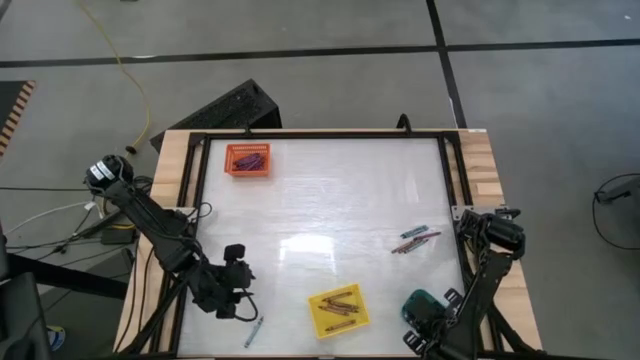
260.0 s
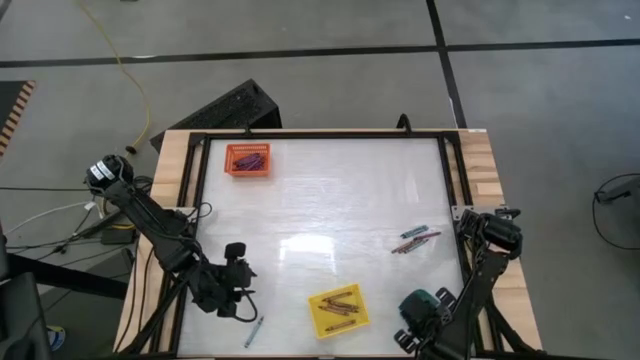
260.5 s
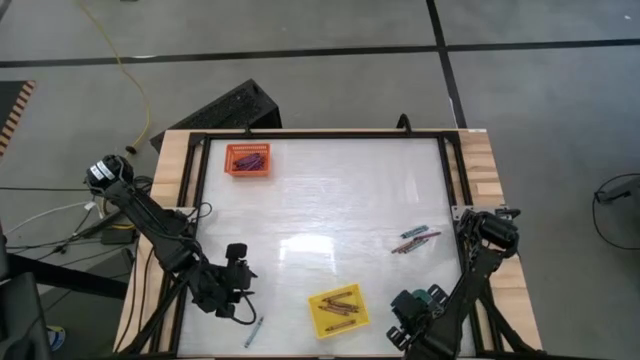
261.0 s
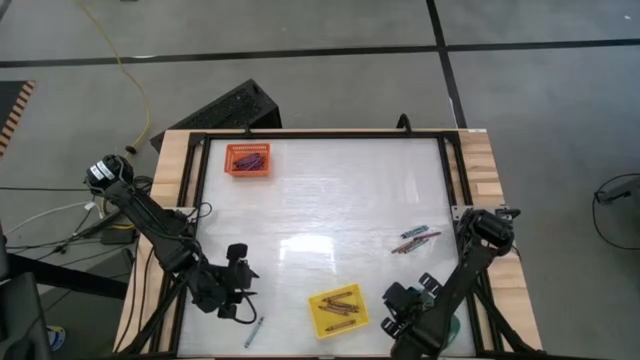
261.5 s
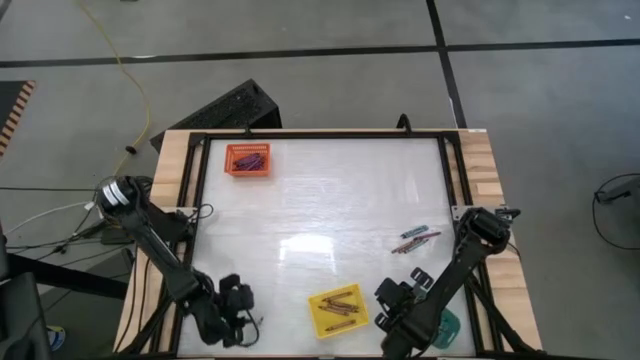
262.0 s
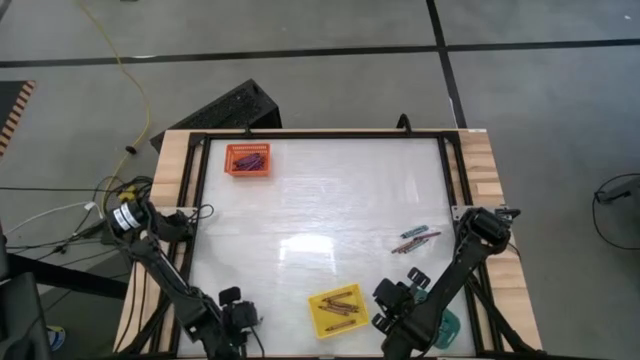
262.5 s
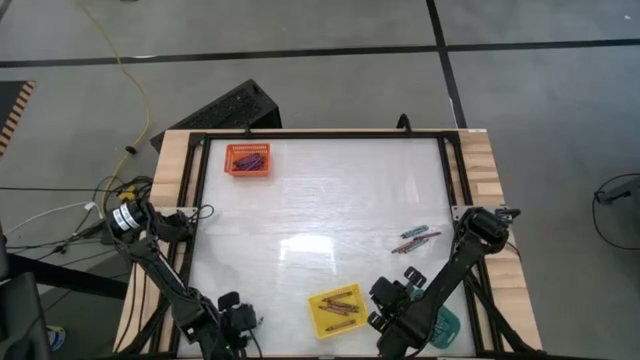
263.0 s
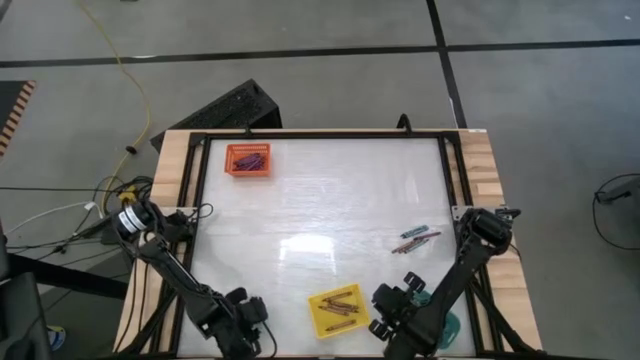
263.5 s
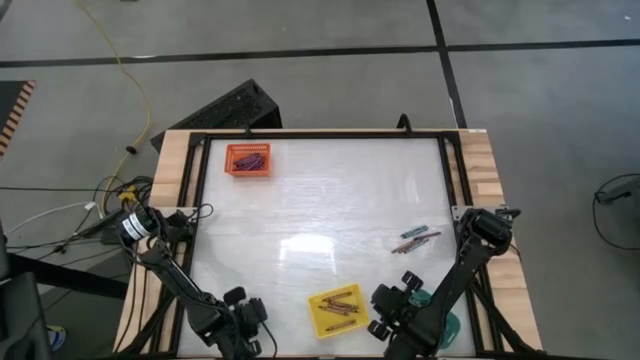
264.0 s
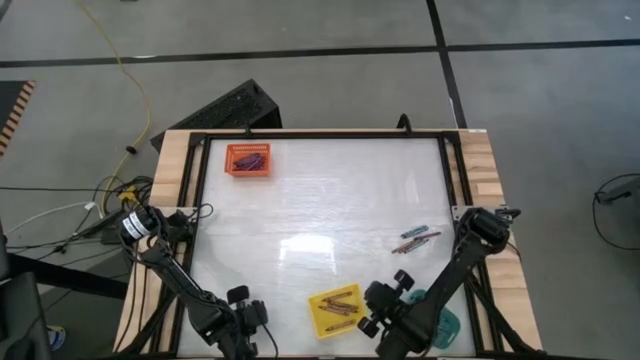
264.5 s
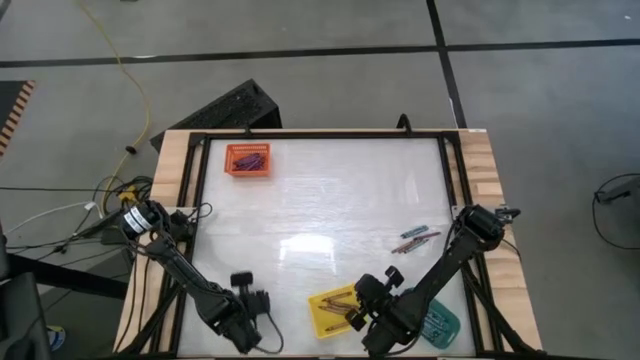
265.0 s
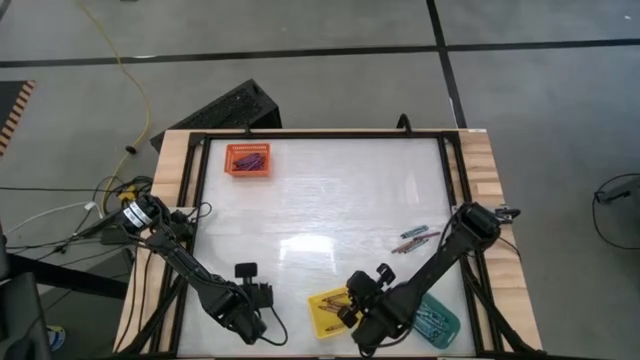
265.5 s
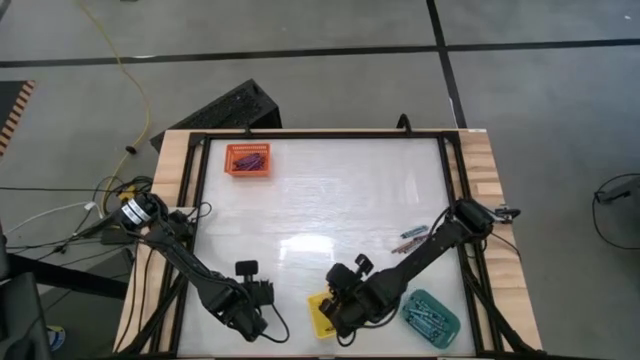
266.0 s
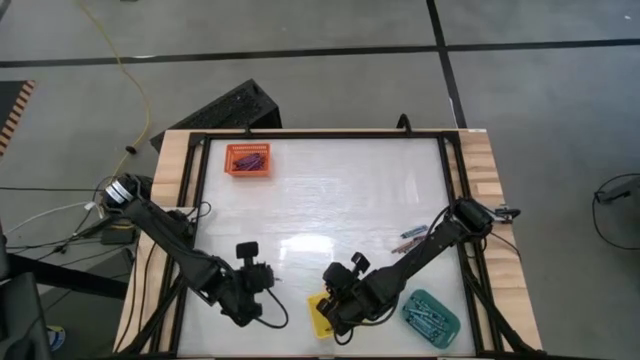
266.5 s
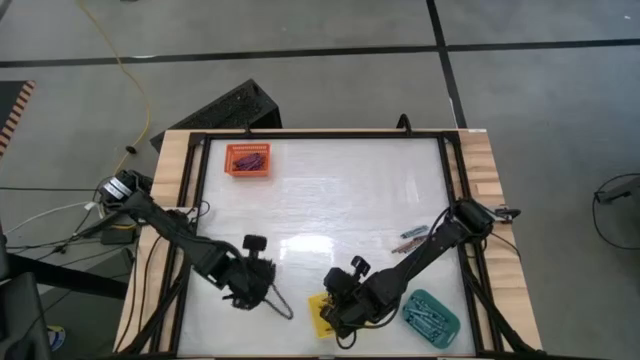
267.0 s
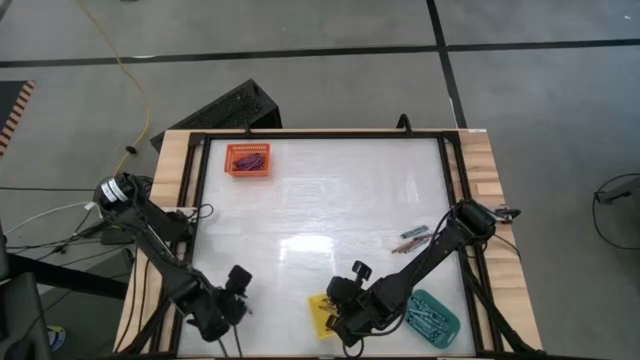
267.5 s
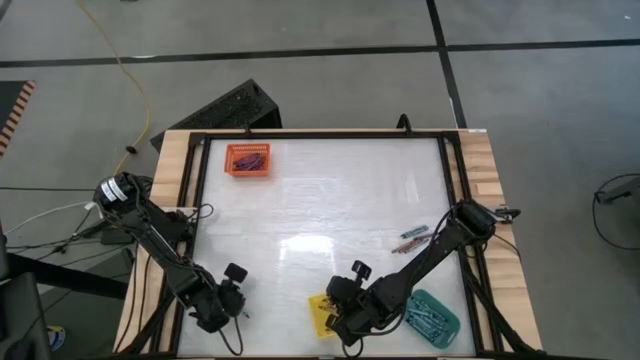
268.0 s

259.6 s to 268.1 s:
Task: Sort crayons
Put the blue crayon into the green bin

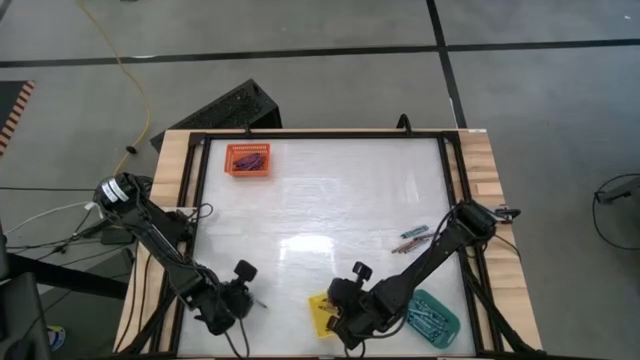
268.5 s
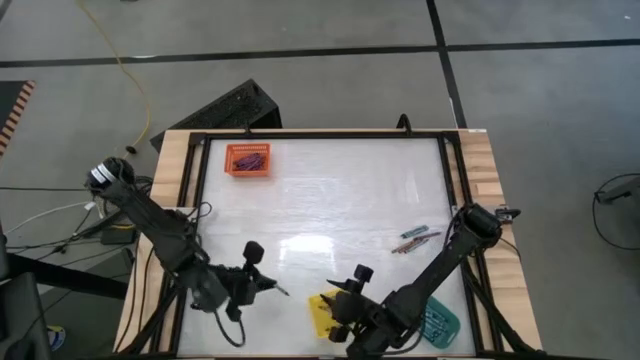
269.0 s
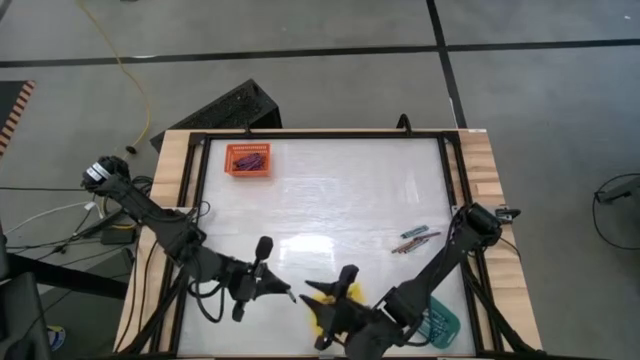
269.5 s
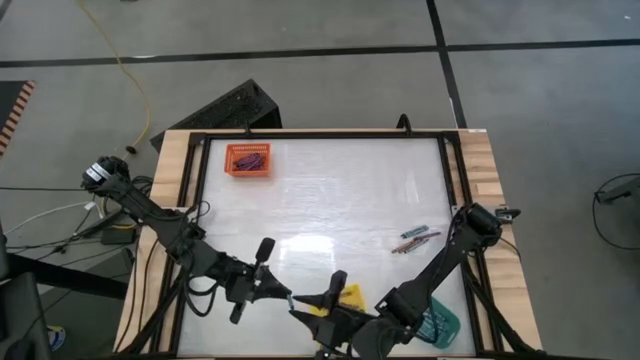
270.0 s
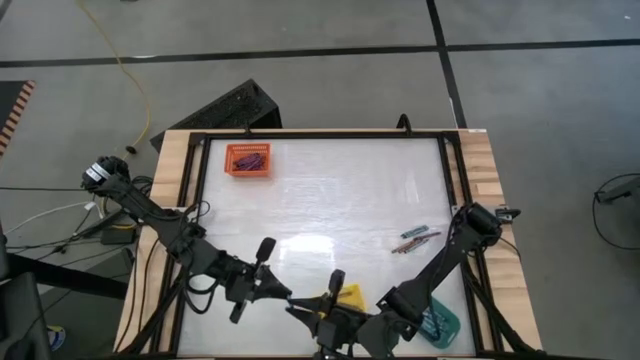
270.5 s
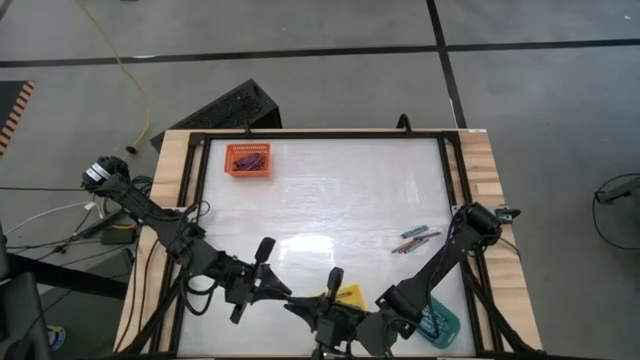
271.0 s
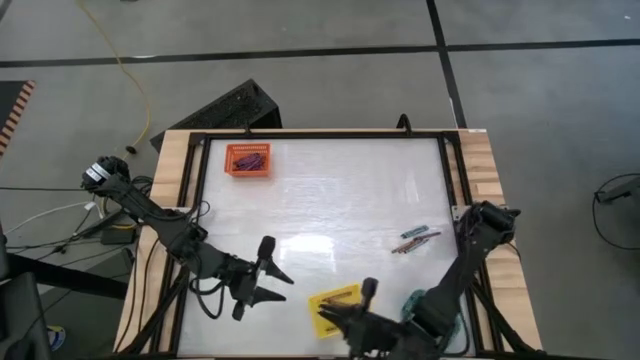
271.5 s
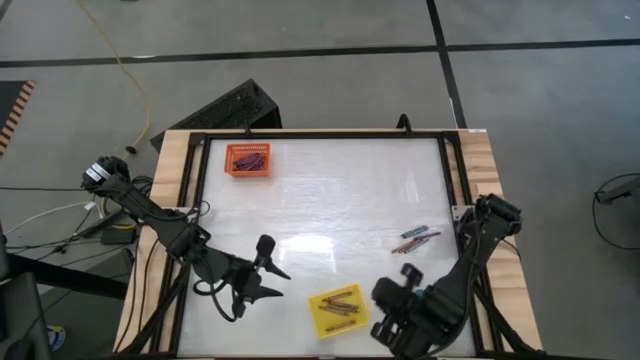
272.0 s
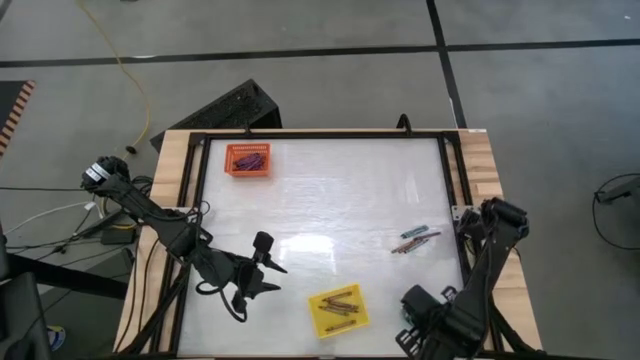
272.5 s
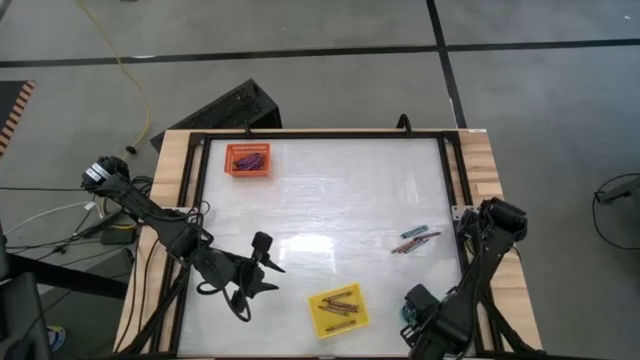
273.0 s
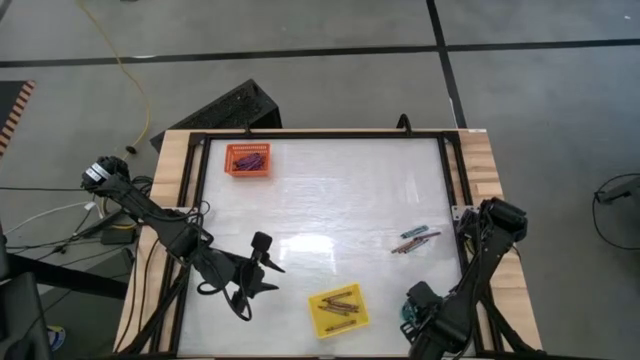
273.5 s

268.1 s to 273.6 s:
Put the blue crayon into the green bin

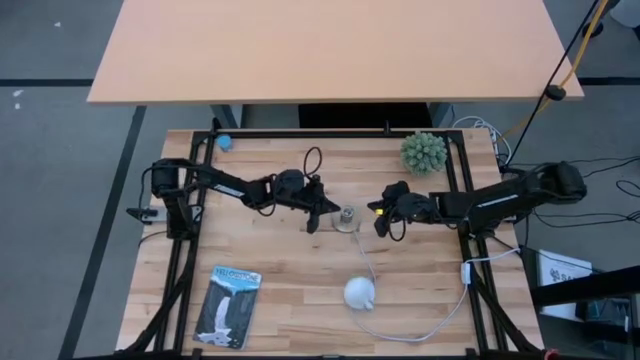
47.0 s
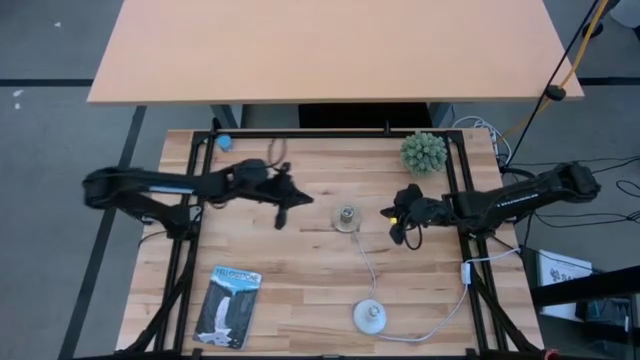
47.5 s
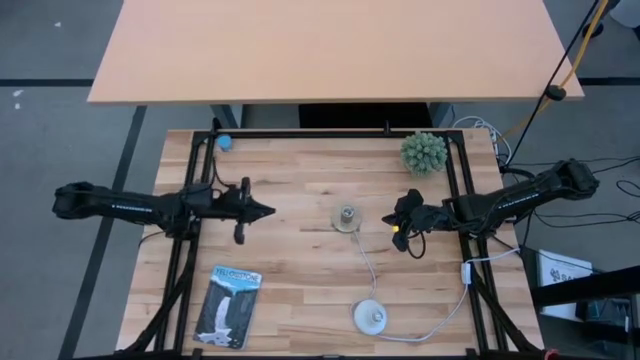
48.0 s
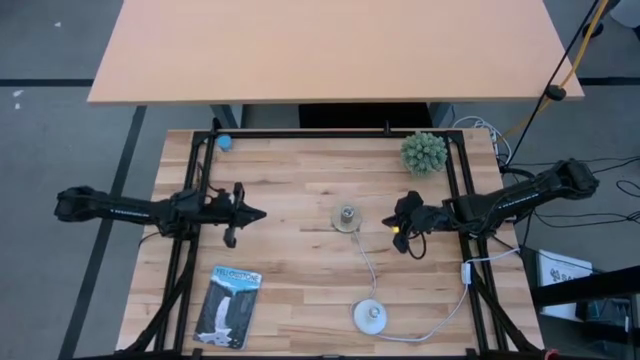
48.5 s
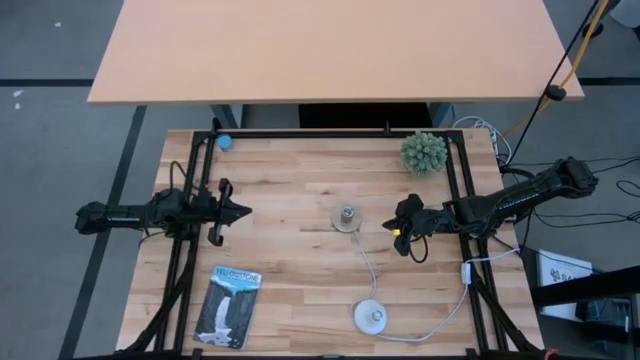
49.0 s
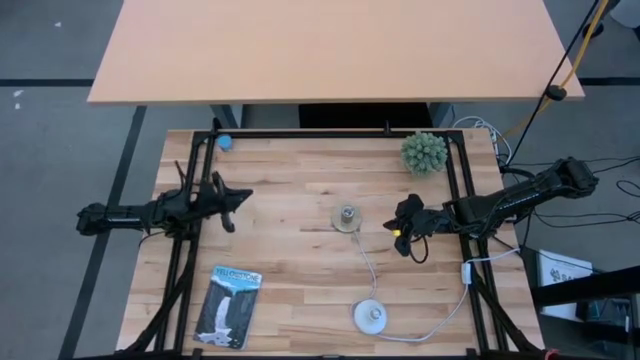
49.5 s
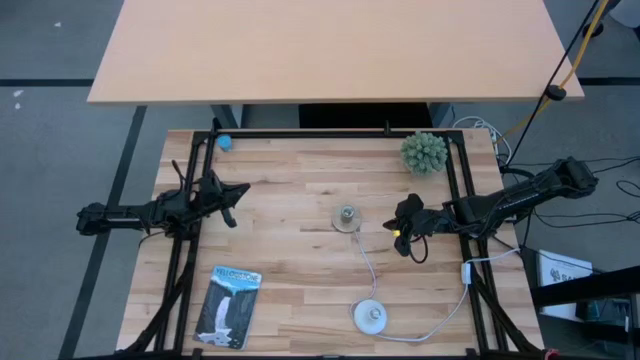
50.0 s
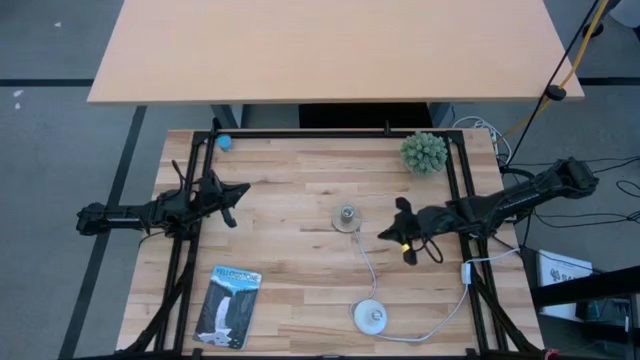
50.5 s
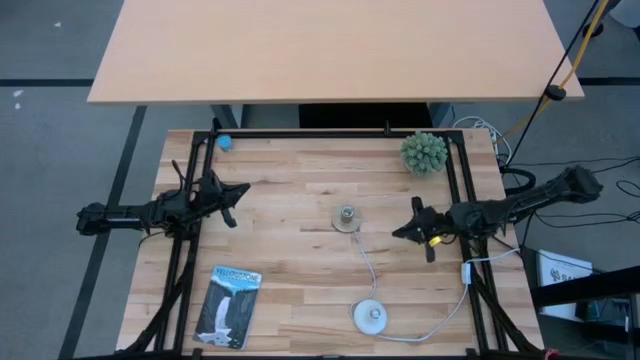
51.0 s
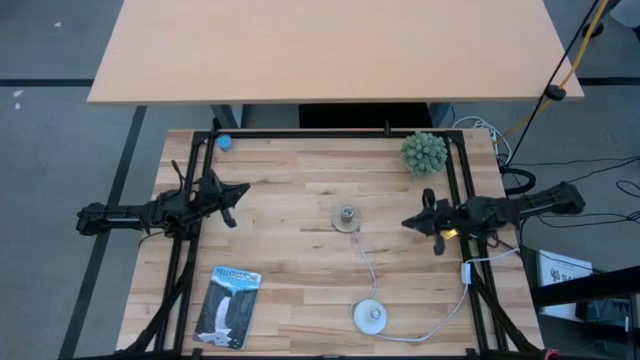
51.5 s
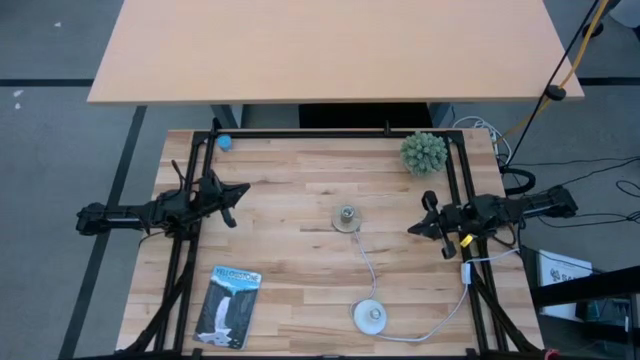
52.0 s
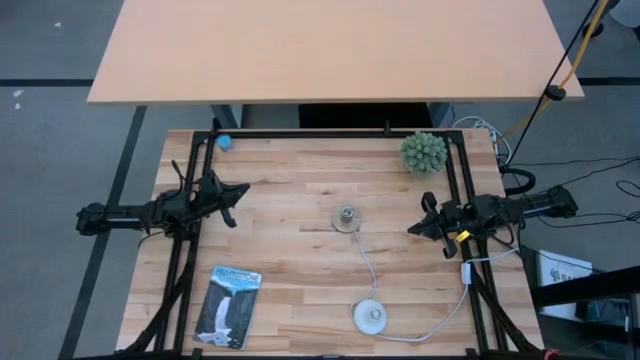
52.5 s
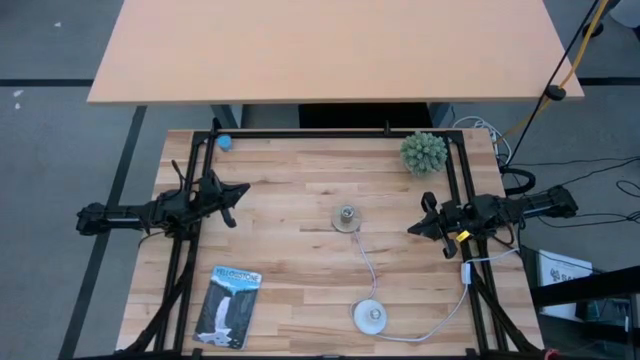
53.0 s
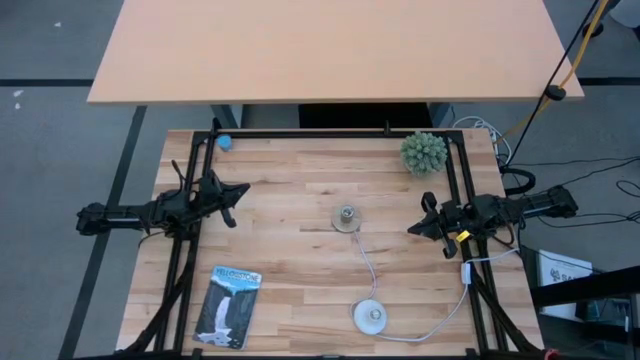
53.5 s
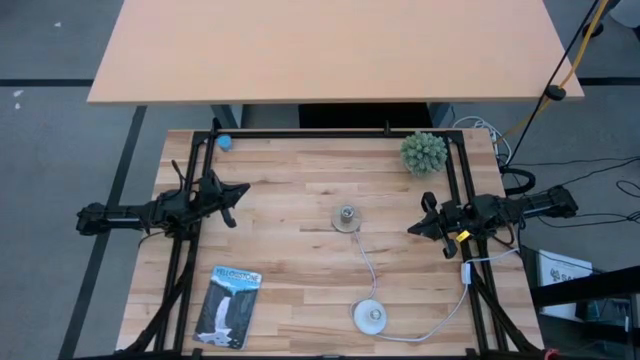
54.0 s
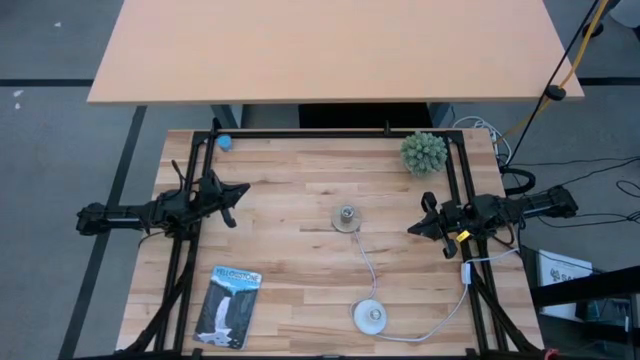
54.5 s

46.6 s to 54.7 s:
Task: Screw lightbulb
Return to Home Position
